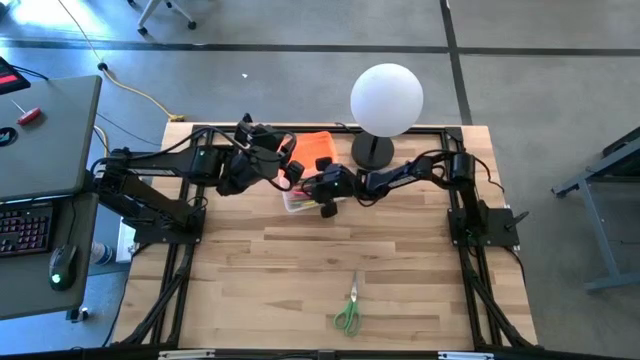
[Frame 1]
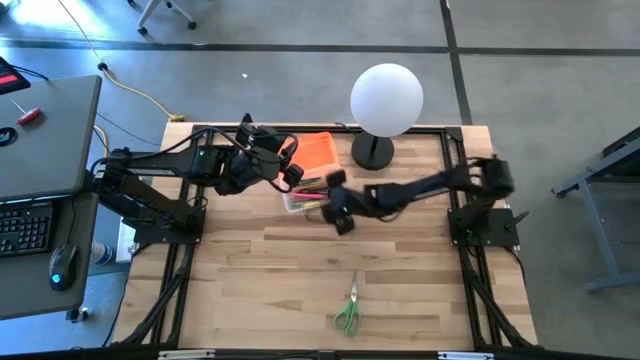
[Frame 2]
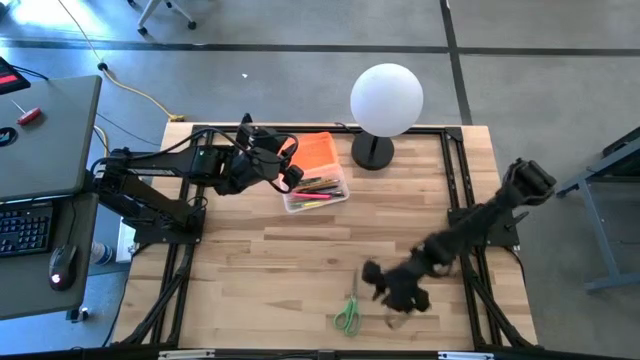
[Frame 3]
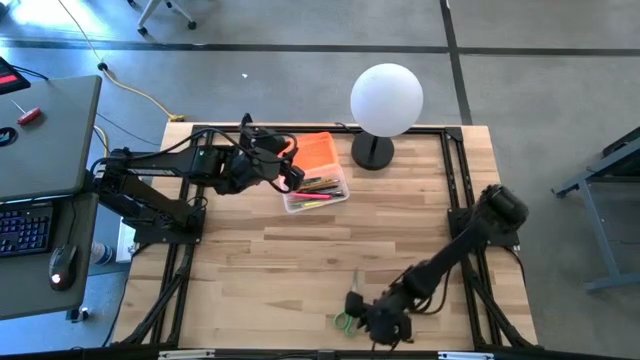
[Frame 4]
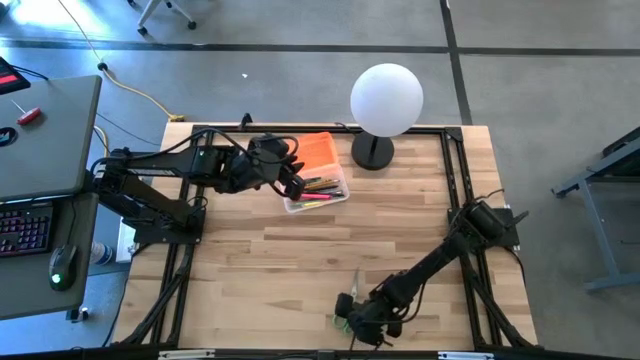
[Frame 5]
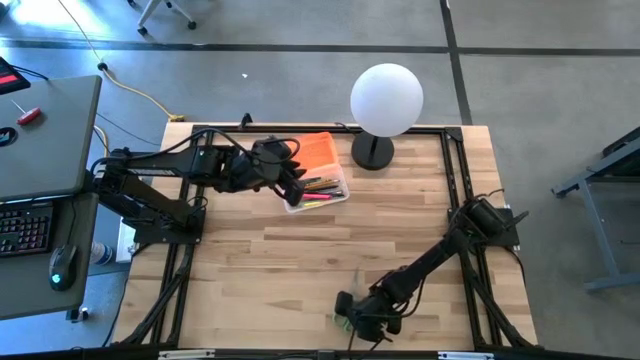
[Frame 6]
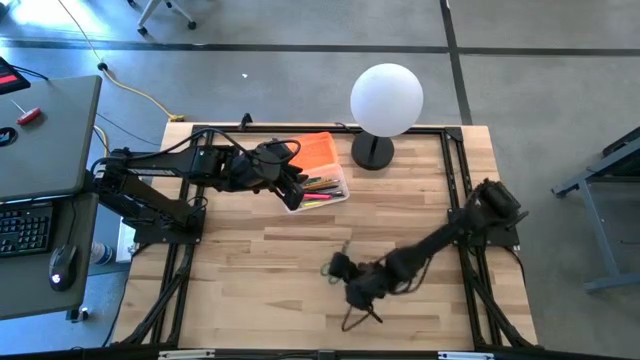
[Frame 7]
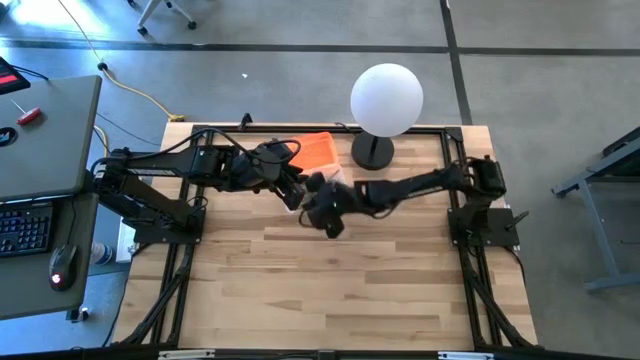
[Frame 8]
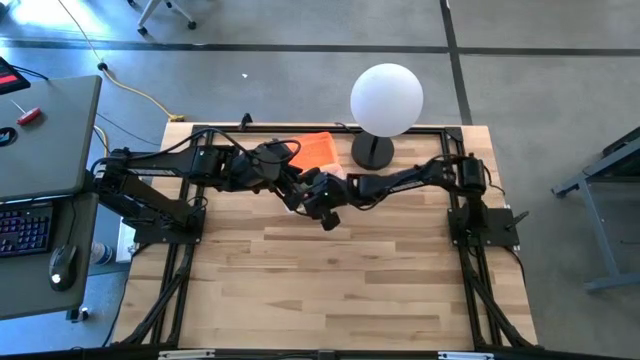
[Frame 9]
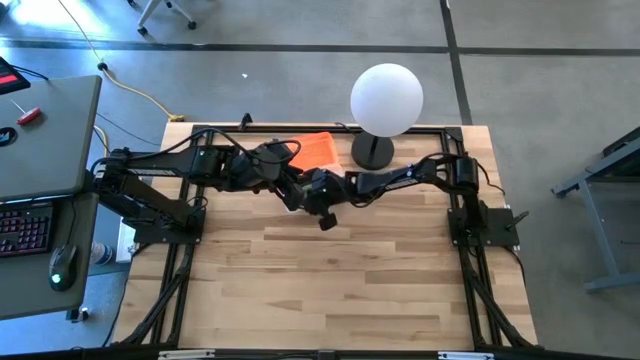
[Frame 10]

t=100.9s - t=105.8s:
Task: Pick & place school supplies into a supply box
Put the green scissors into the transparent supply box

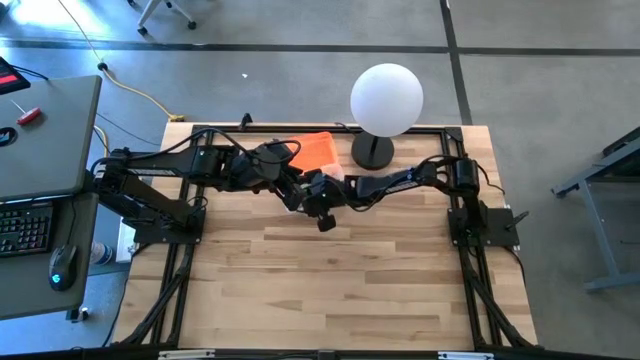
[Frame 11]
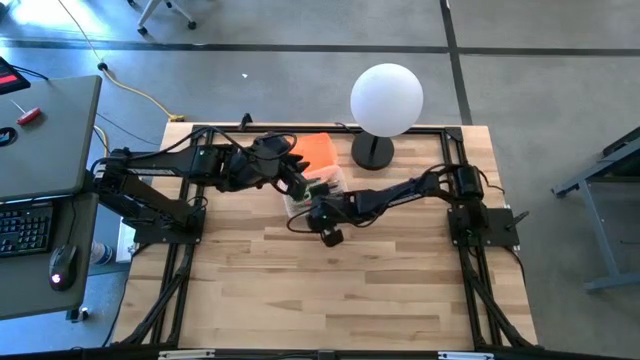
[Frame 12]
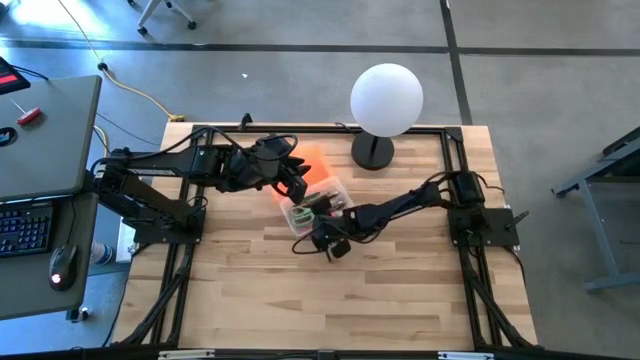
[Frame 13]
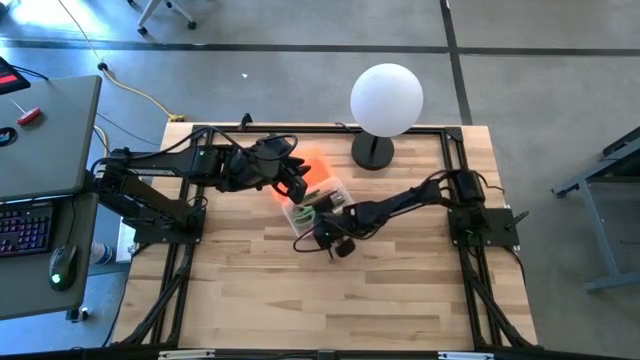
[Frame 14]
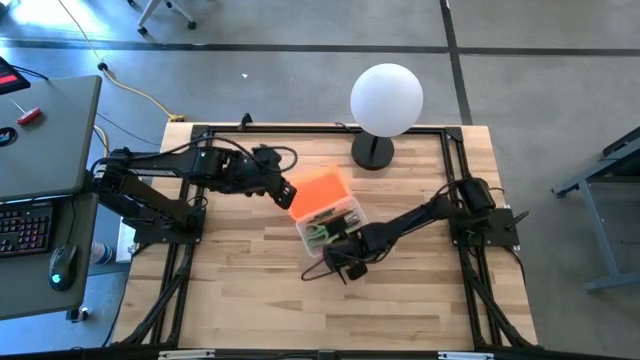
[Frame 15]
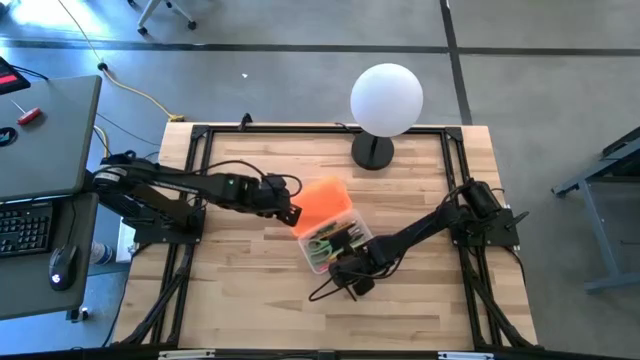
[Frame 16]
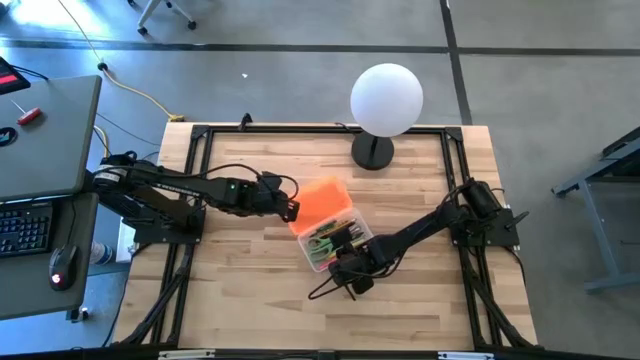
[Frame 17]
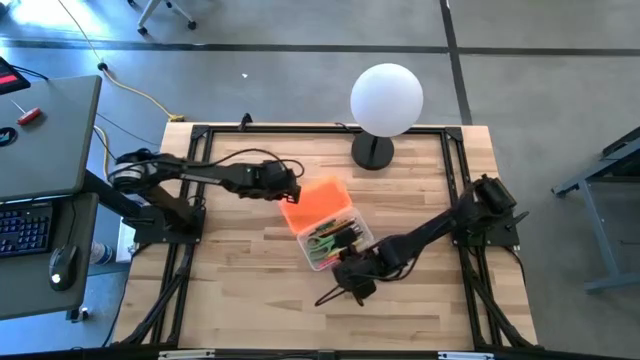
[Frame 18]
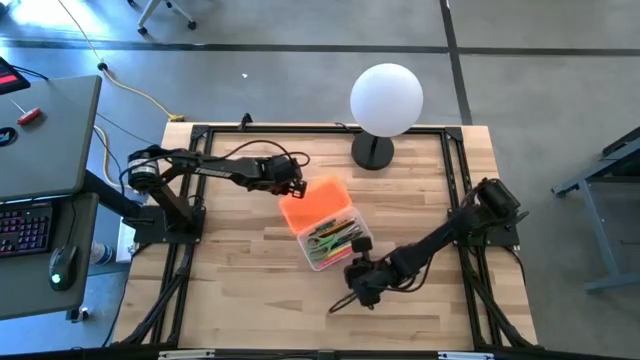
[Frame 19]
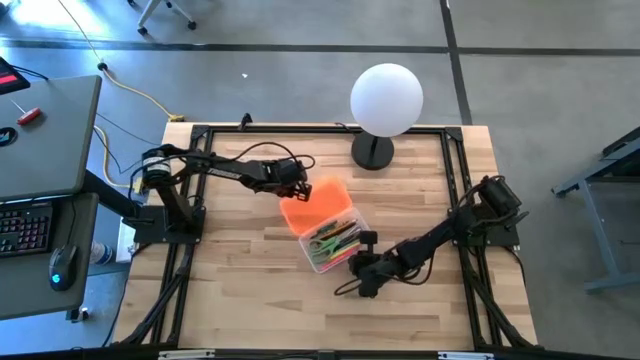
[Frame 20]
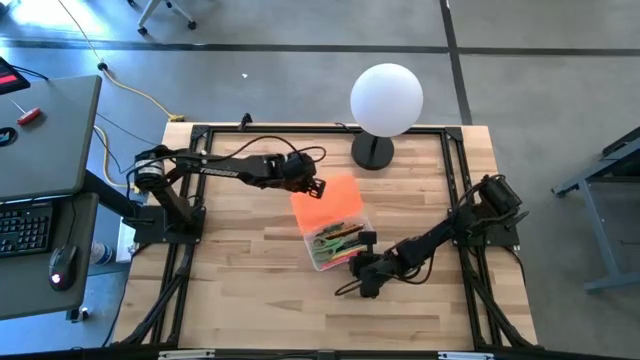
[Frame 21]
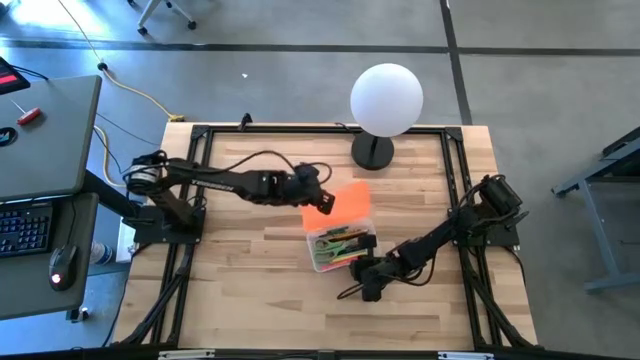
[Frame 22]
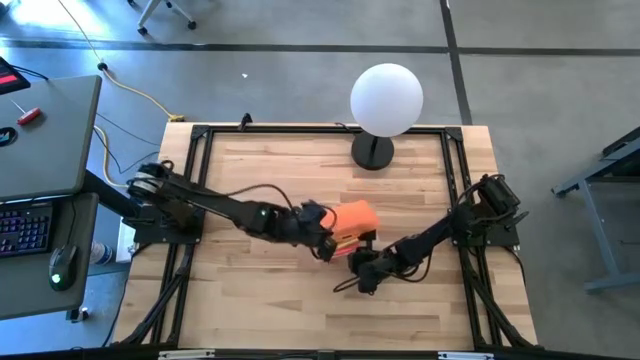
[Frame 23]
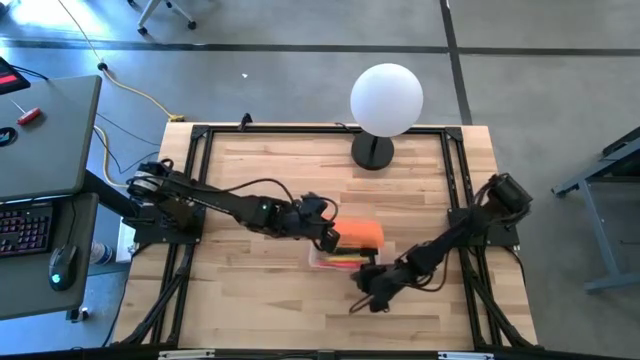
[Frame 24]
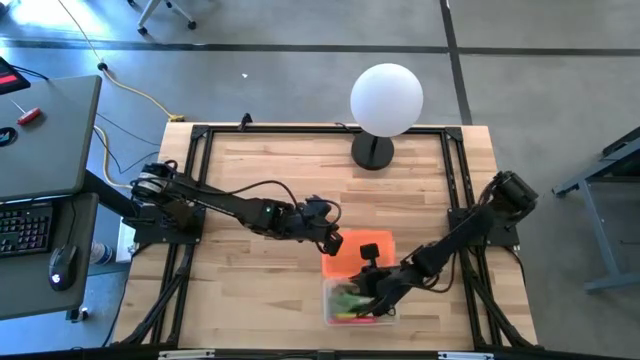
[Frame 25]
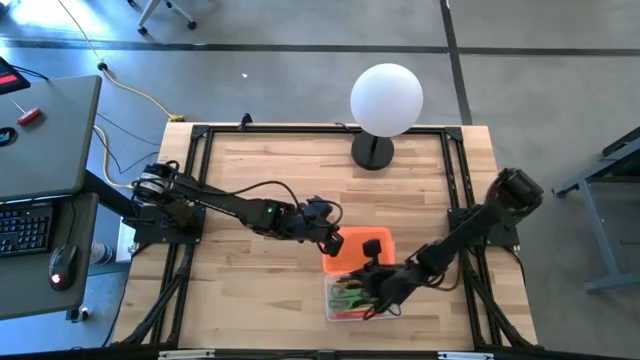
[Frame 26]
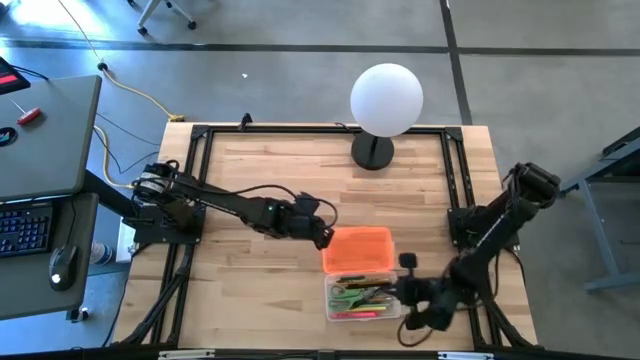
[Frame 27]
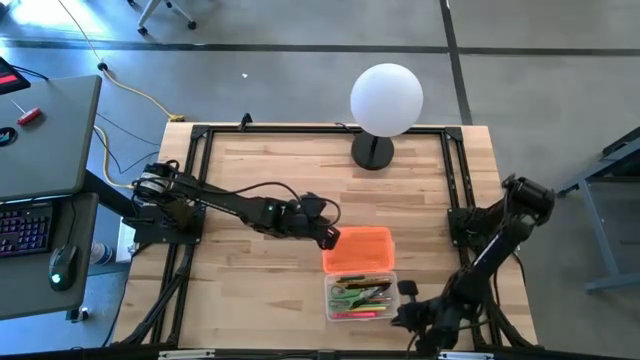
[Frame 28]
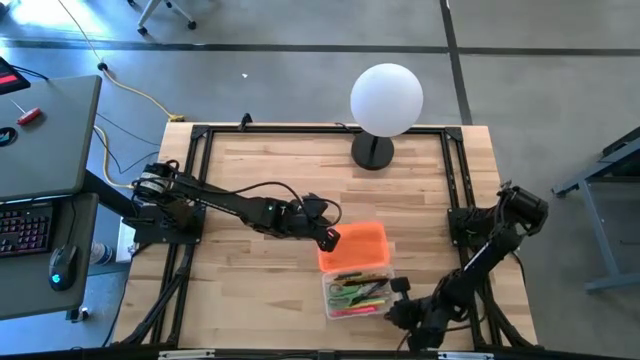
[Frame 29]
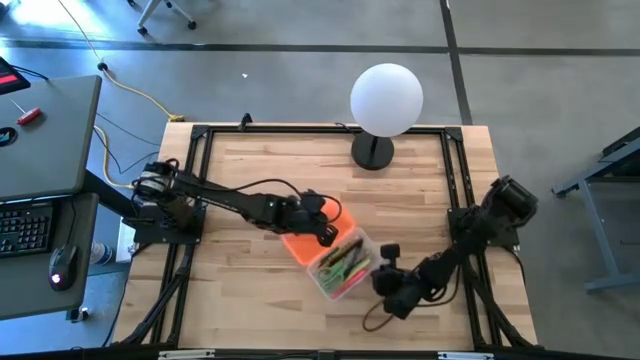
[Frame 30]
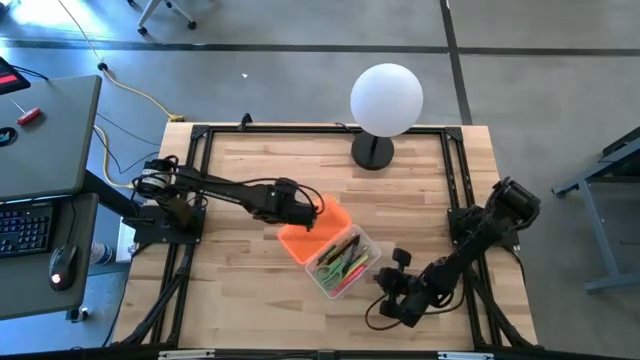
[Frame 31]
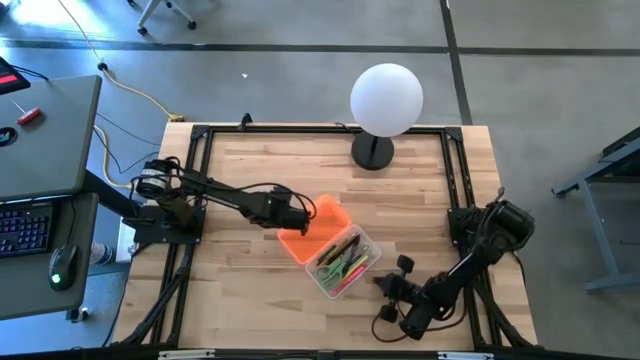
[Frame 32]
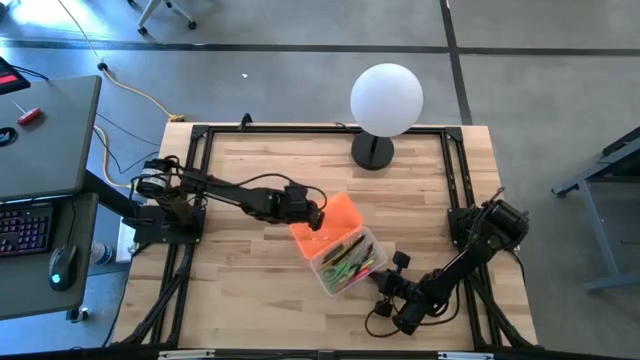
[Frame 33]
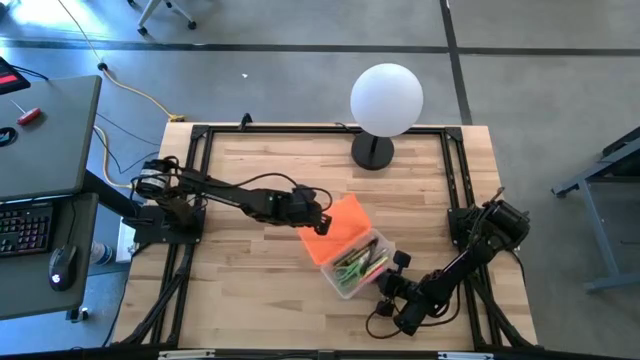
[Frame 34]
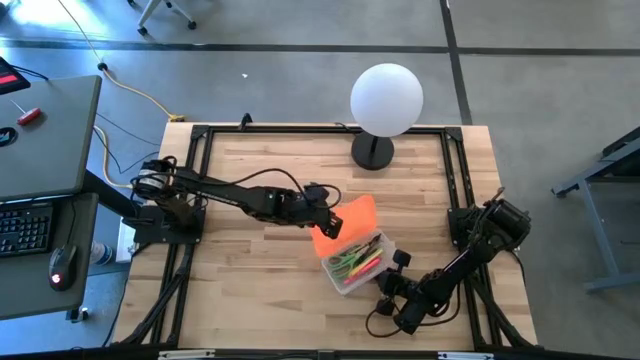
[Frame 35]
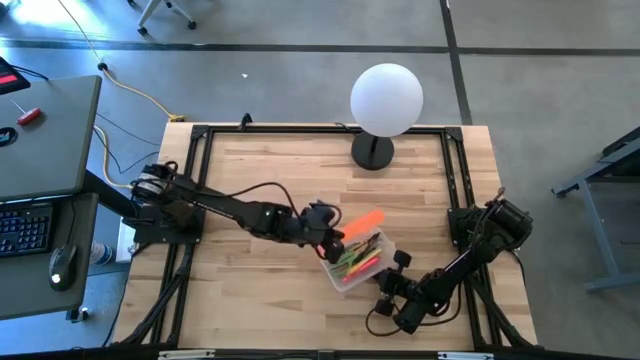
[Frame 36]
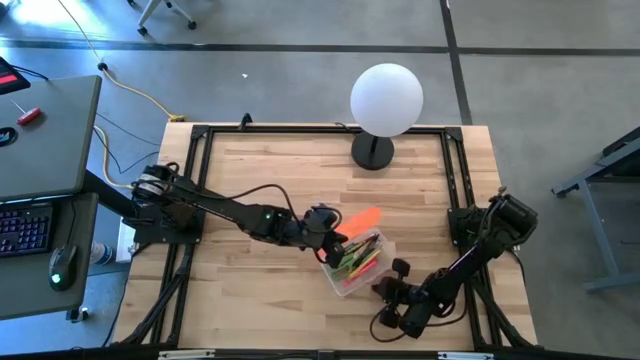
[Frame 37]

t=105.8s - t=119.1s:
Close the transparent supply box

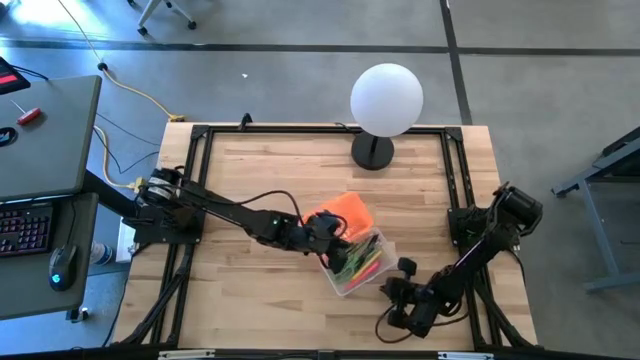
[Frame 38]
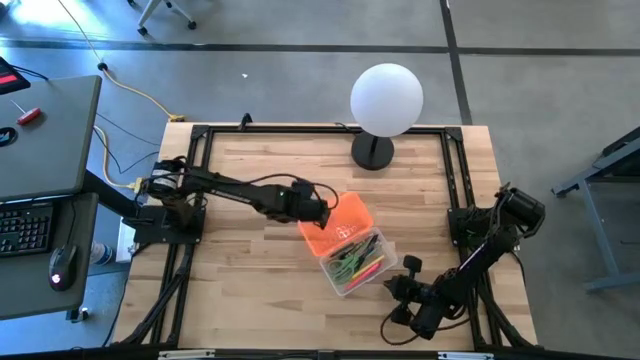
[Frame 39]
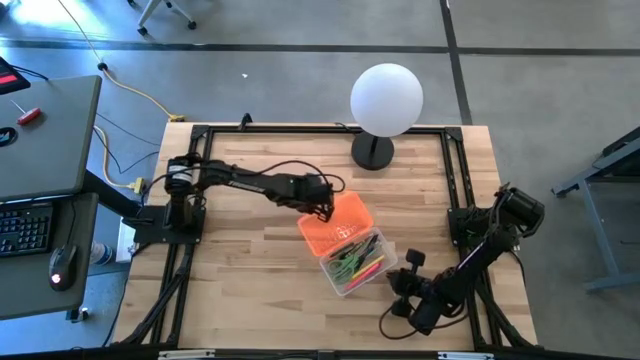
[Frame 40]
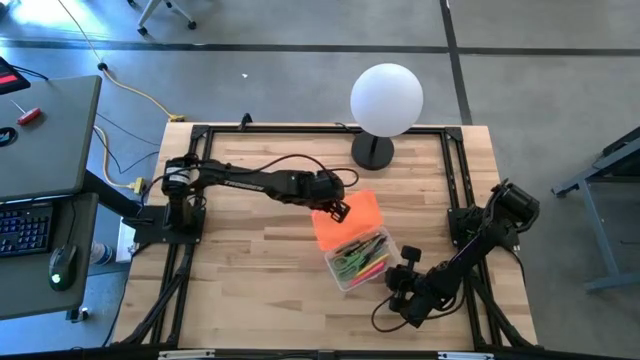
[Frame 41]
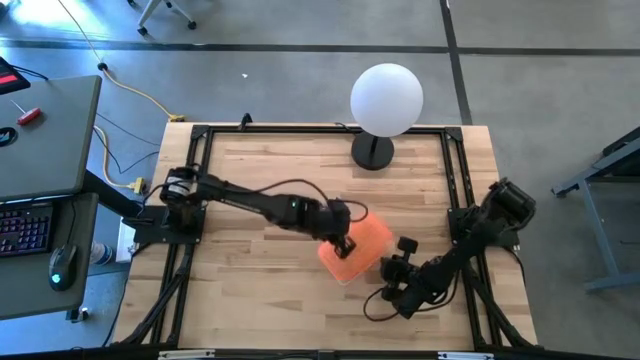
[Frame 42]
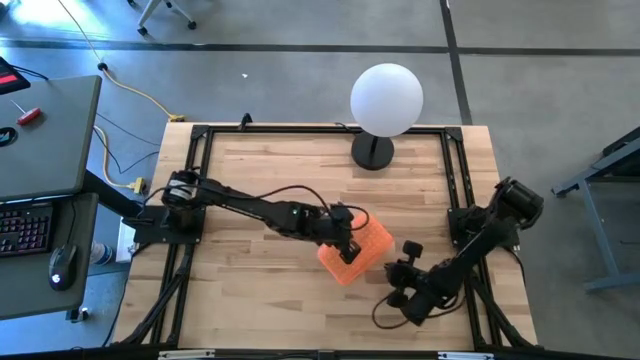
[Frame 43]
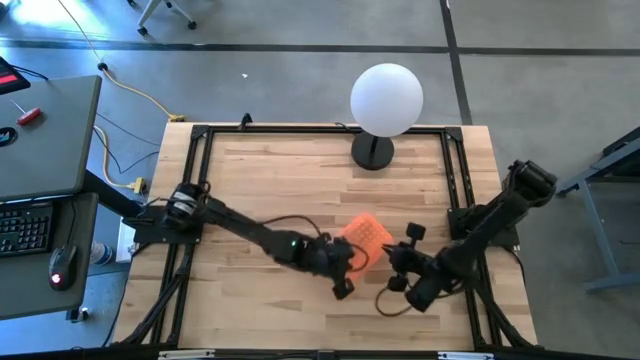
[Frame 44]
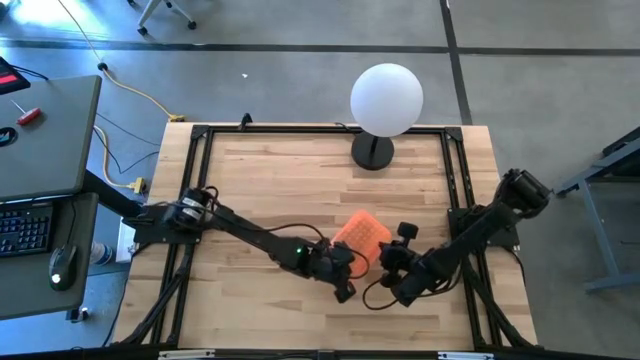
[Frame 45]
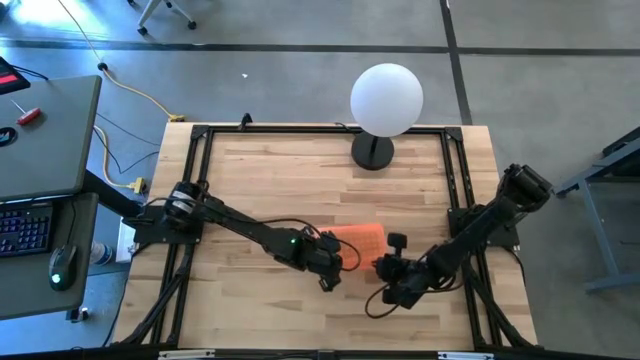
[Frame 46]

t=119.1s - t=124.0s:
Close the transparent supply box
